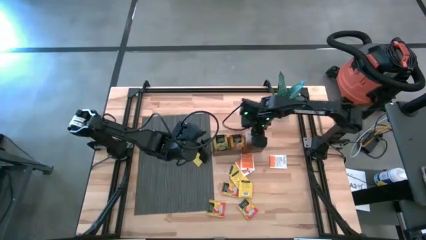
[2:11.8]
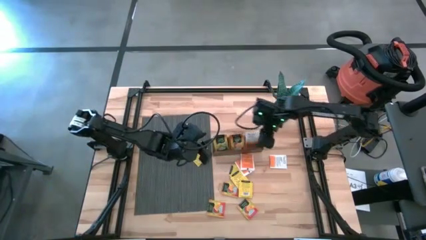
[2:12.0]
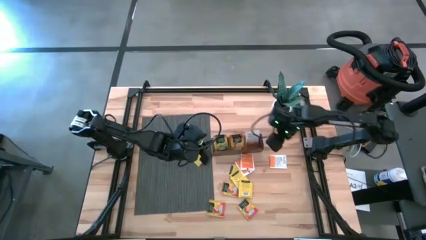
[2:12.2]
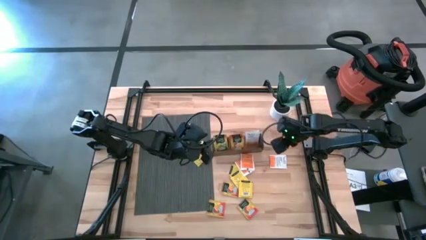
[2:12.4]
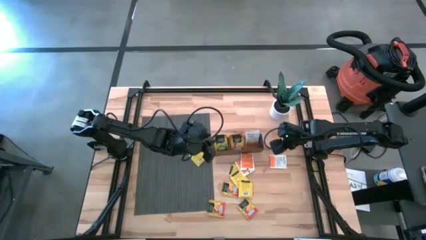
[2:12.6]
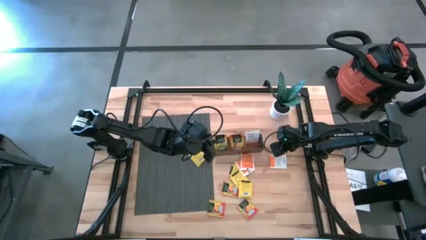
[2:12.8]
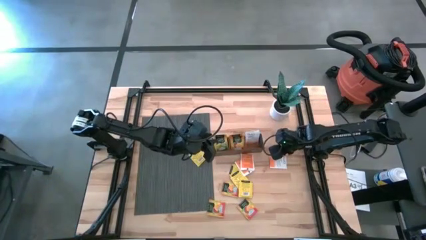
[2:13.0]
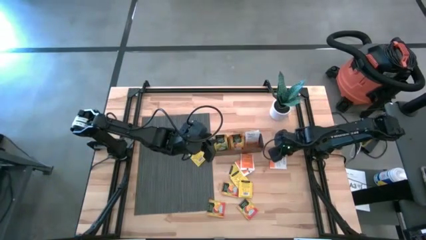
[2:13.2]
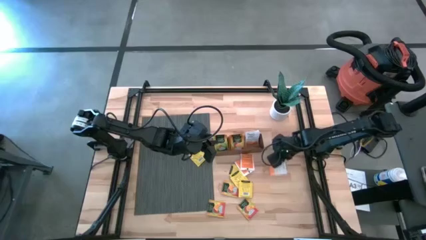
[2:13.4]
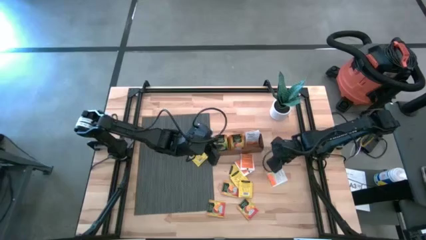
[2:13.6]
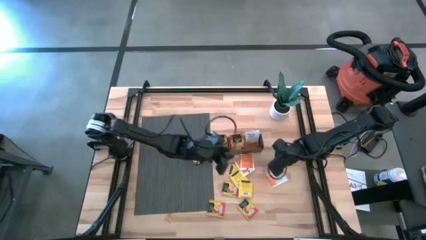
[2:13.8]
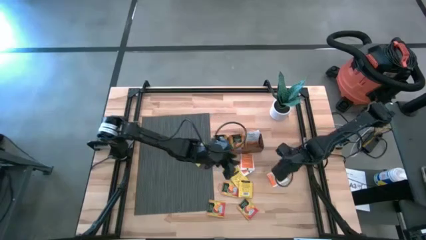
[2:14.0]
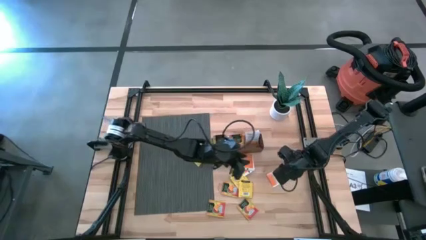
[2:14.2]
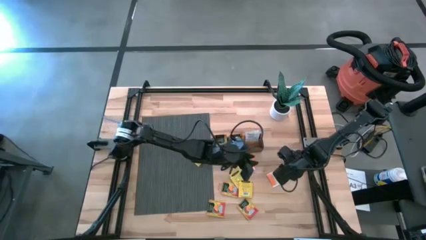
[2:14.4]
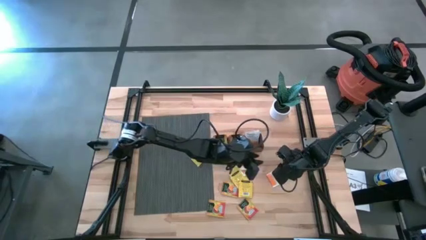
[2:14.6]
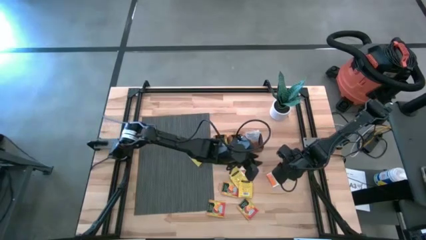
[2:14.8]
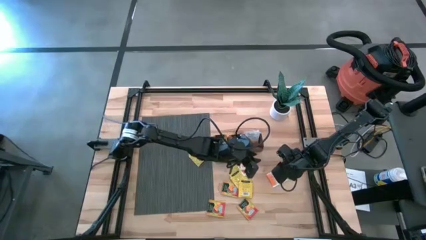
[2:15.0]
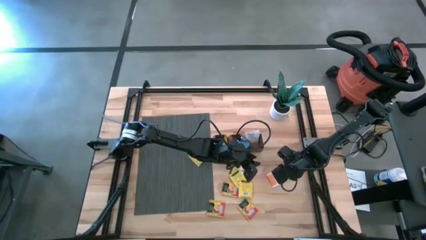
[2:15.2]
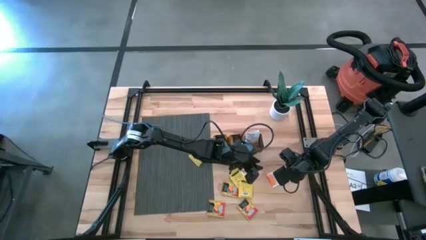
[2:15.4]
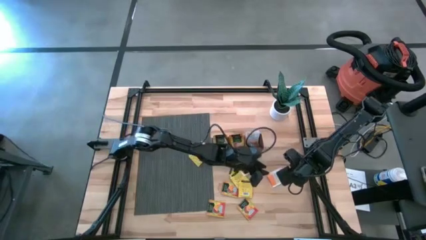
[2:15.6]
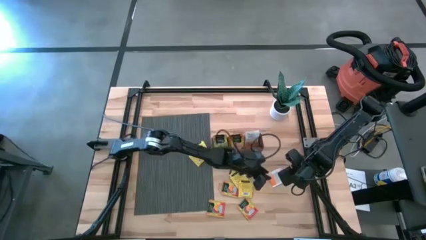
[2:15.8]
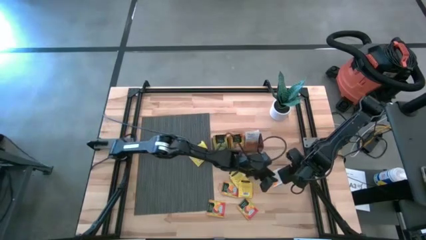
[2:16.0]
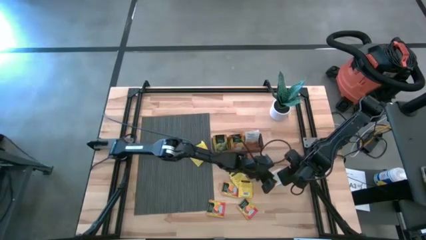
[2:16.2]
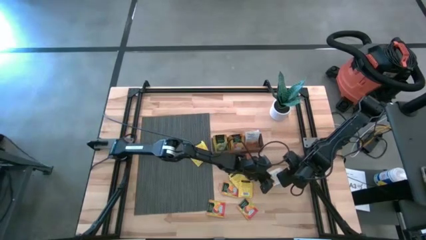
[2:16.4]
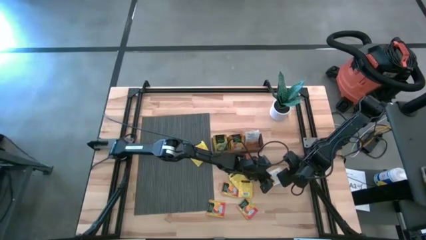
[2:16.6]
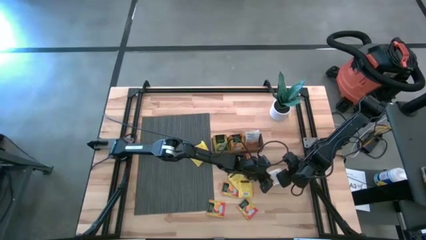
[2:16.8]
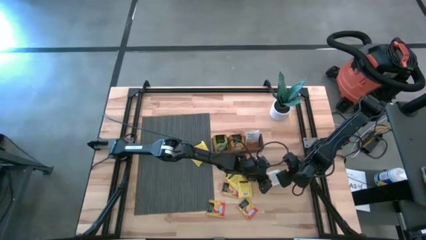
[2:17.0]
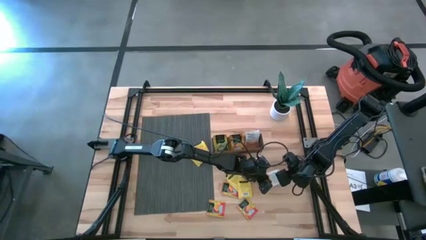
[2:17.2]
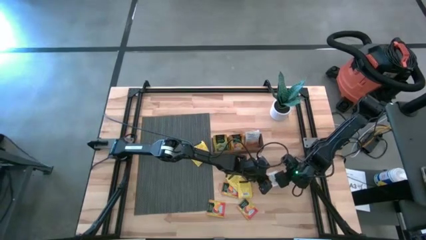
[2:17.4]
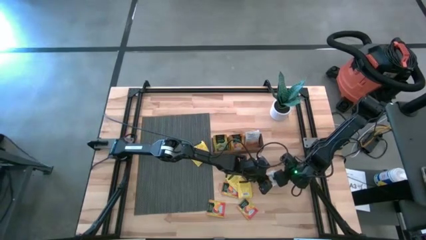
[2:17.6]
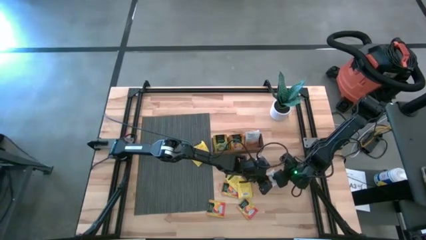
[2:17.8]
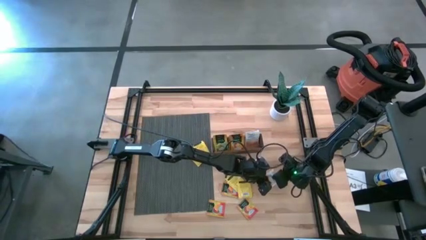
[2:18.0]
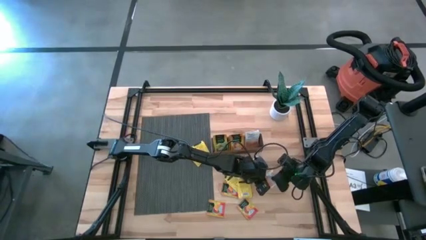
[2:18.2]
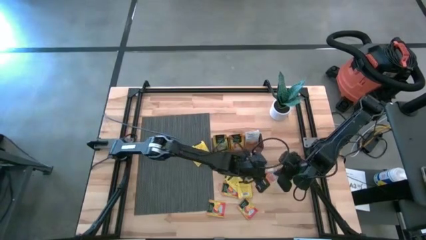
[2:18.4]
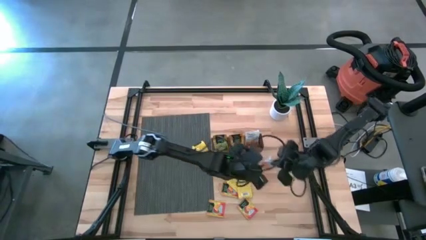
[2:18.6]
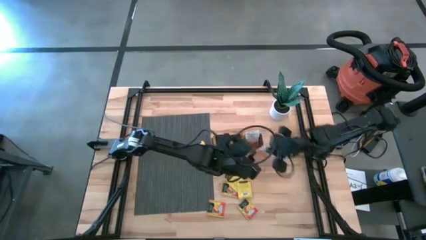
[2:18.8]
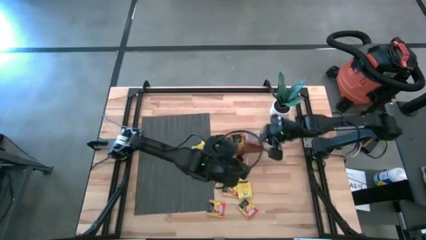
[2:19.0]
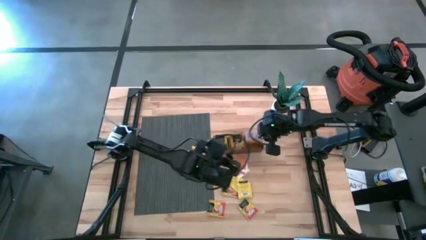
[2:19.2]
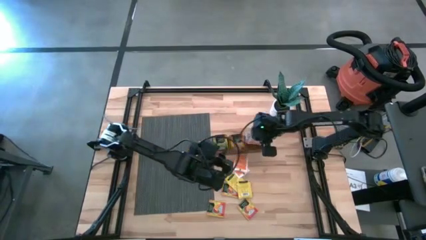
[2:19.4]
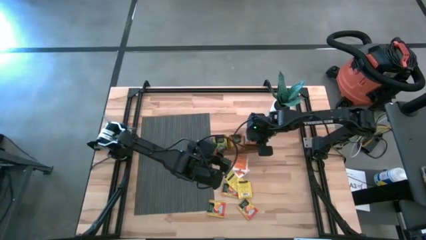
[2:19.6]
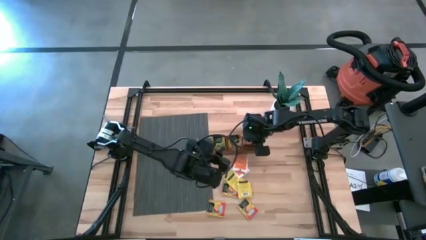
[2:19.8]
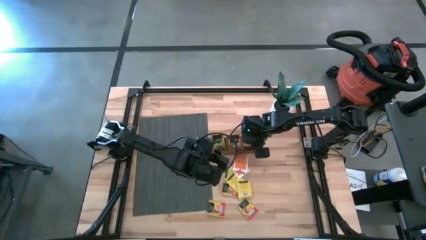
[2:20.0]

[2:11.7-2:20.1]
Task: Pick & Place Tea
Put the white tea bag into the right section of the wooden organizer

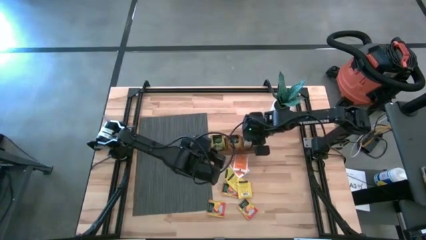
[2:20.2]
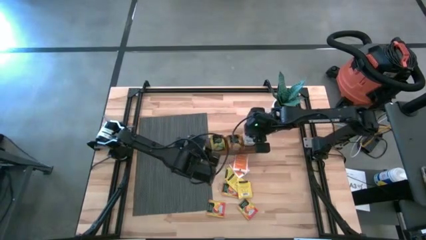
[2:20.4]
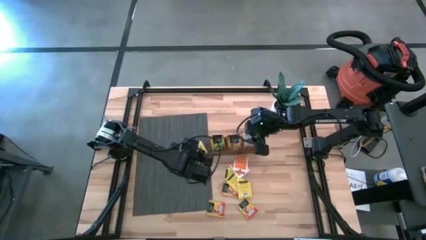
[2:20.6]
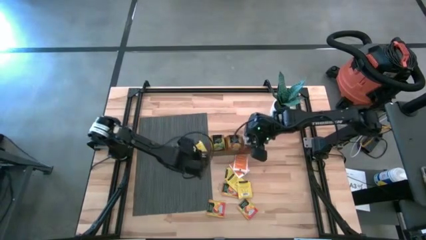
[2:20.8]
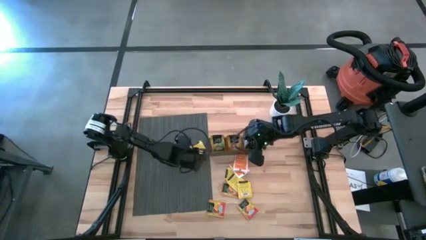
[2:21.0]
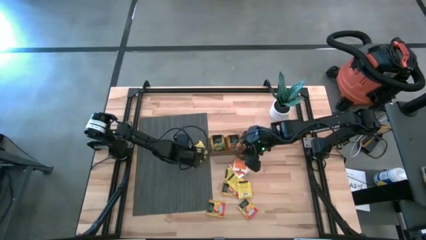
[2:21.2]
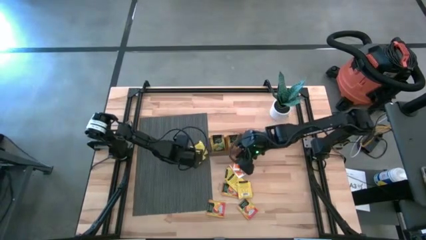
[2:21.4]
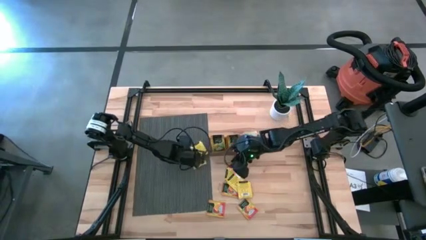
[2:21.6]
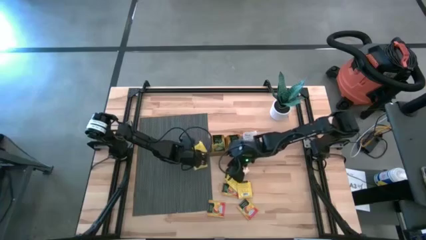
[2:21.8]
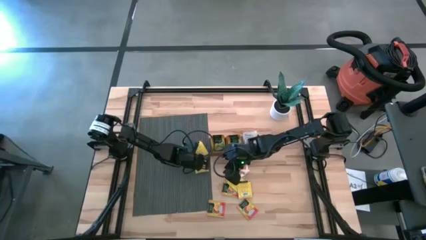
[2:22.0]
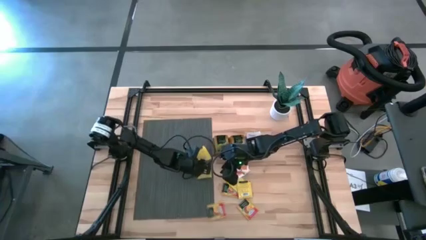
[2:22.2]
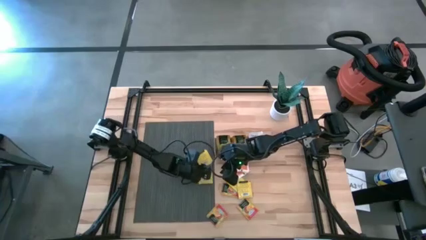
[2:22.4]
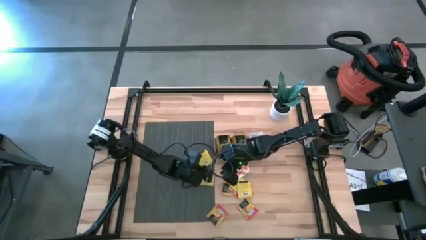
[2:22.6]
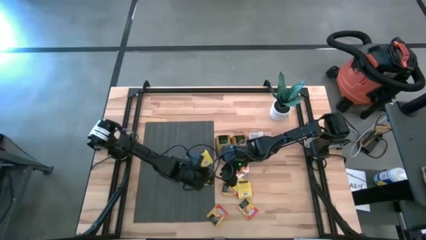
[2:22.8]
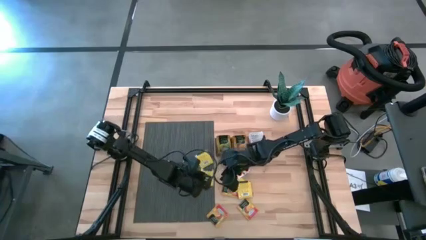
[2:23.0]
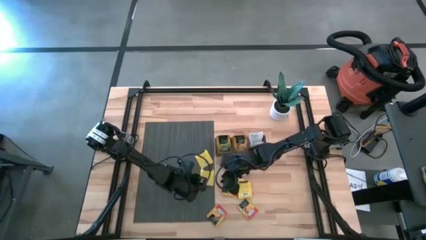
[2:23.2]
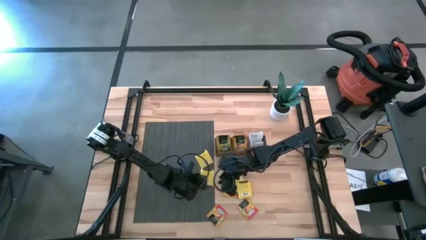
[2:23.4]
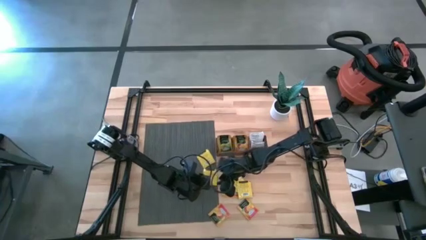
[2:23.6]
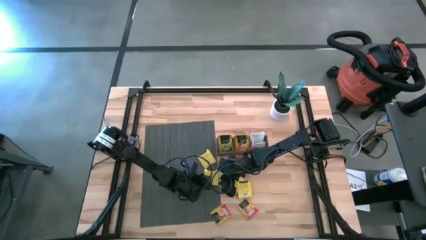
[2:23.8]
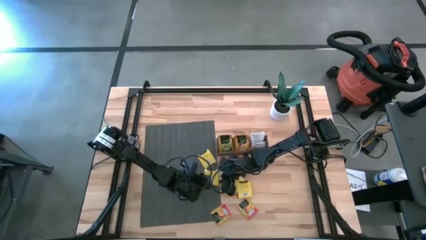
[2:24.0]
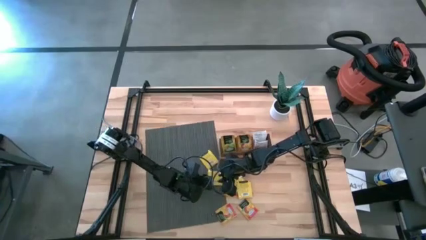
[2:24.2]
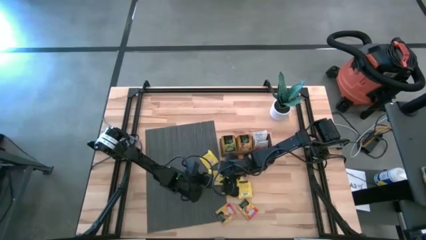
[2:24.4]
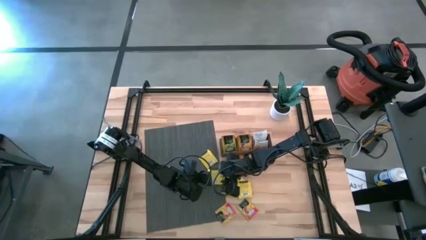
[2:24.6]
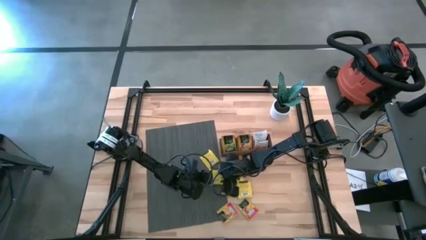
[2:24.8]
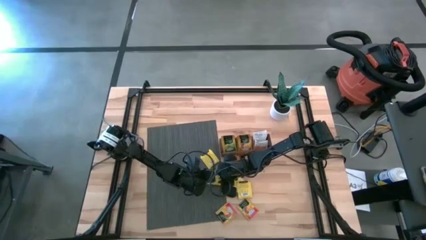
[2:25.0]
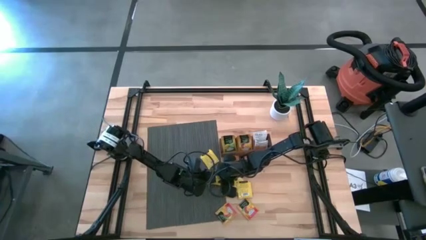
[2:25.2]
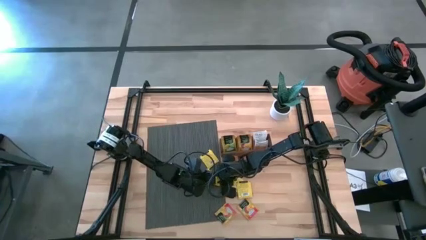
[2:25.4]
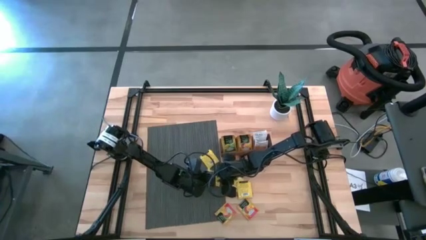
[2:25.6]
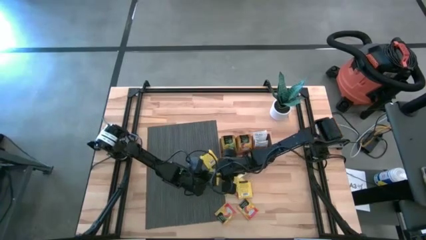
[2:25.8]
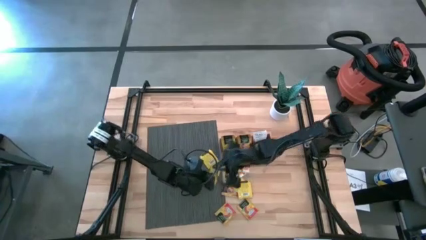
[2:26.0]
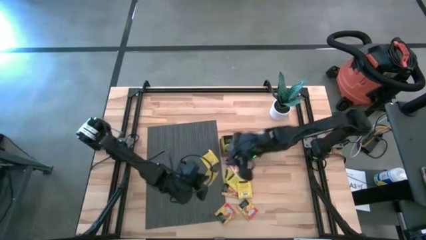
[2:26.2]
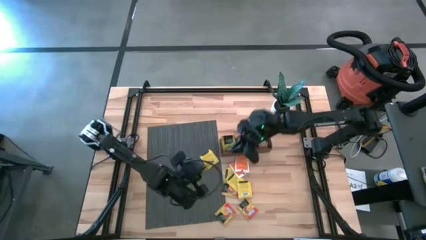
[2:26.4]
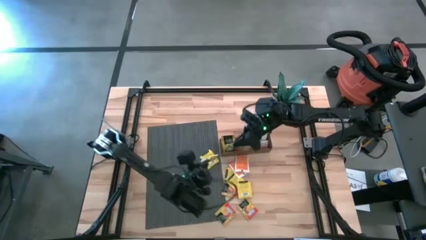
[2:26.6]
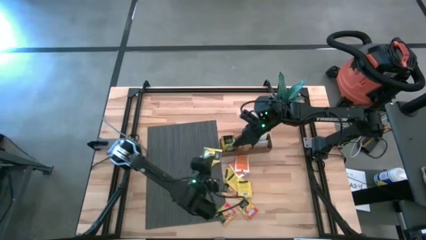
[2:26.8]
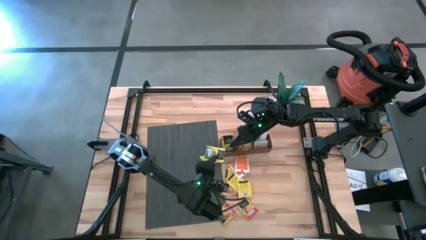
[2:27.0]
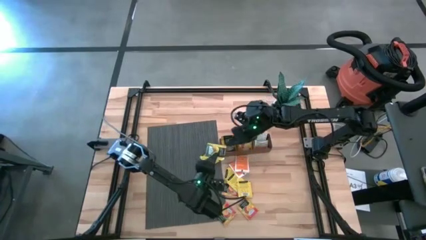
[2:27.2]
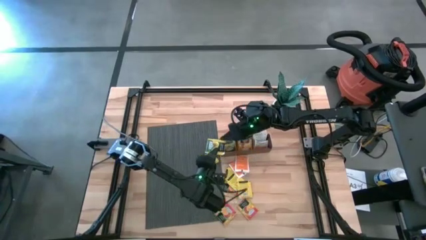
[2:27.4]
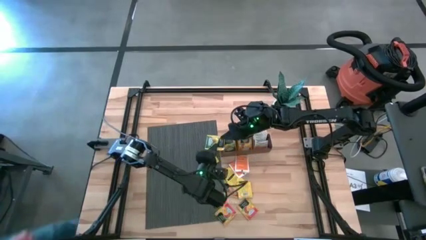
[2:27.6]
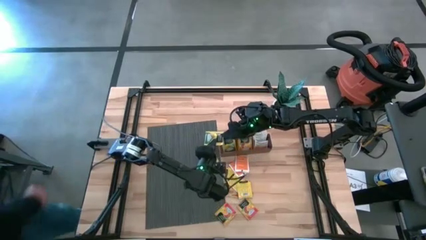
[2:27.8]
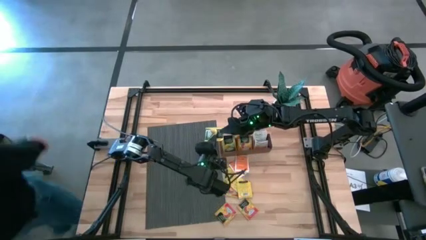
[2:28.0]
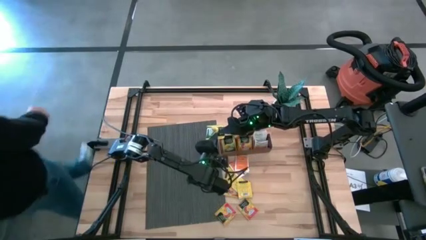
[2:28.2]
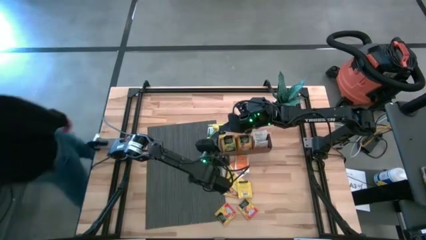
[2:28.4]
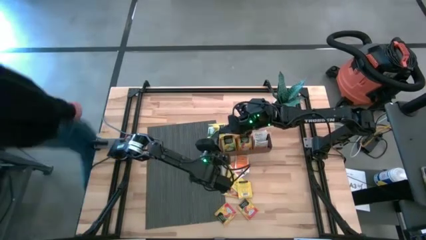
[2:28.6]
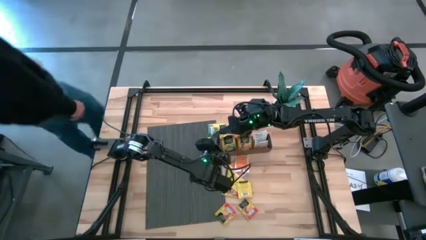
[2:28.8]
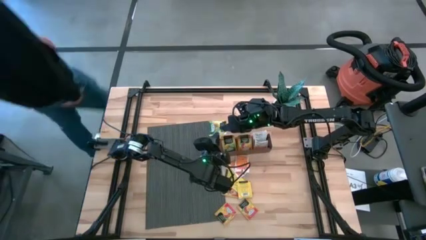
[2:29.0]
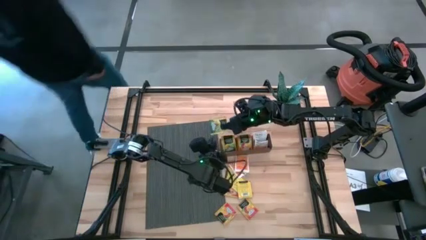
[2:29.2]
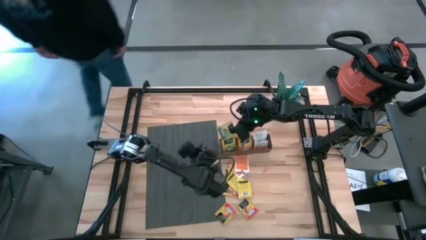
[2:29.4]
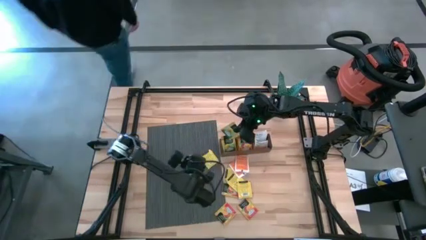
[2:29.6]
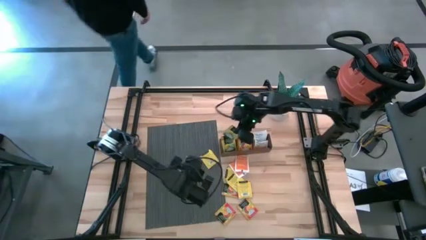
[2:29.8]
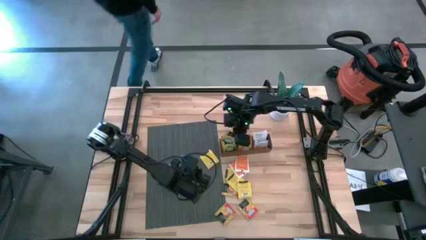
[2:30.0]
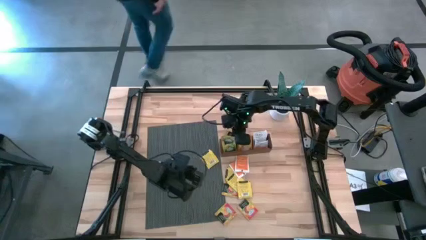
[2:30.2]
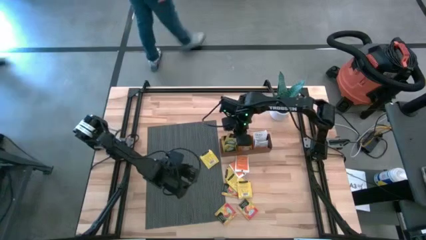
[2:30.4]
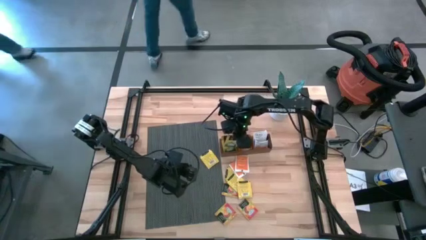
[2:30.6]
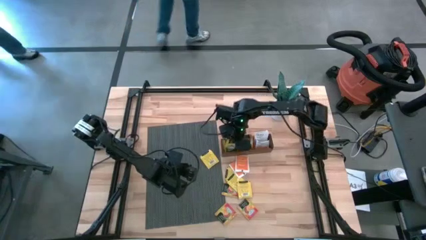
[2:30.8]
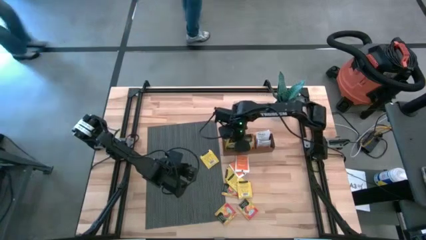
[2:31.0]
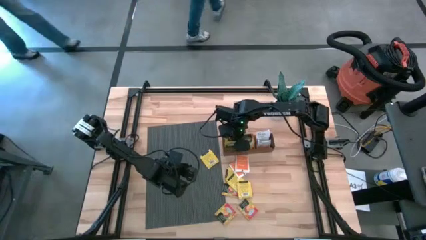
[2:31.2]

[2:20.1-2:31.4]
Put the yellow tea bag into the middle section of the wooden organizer
